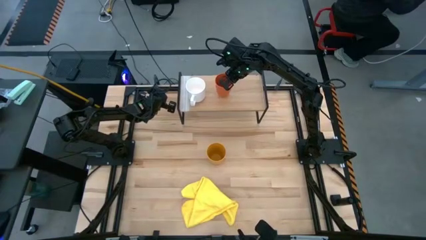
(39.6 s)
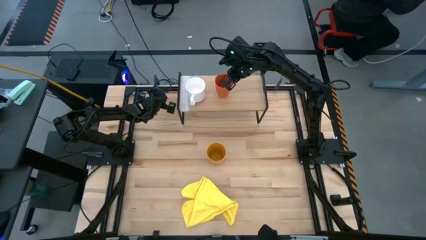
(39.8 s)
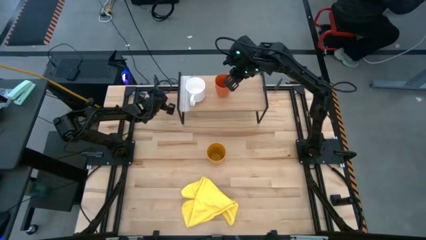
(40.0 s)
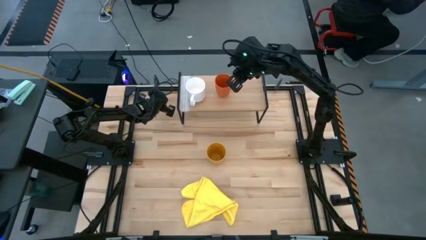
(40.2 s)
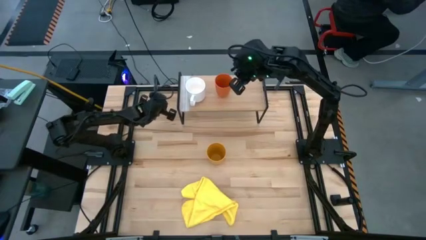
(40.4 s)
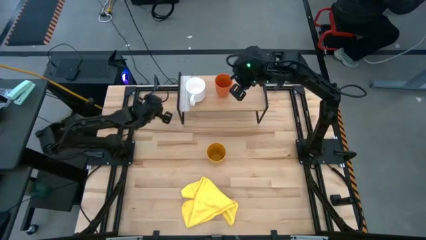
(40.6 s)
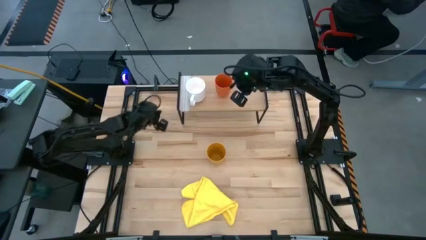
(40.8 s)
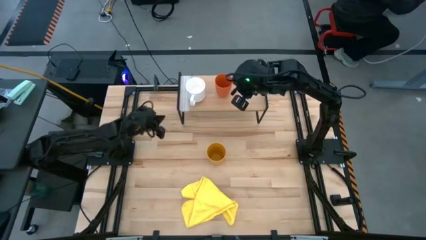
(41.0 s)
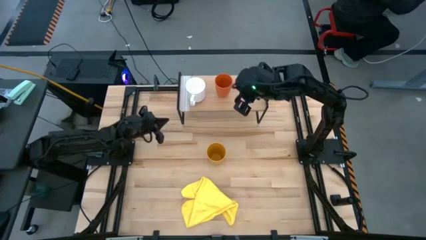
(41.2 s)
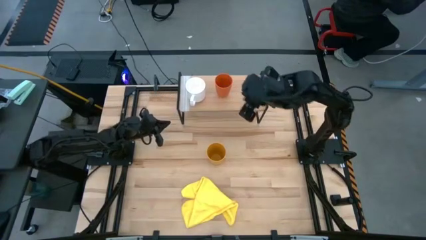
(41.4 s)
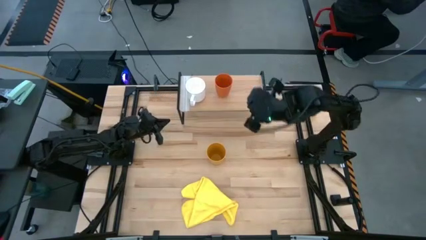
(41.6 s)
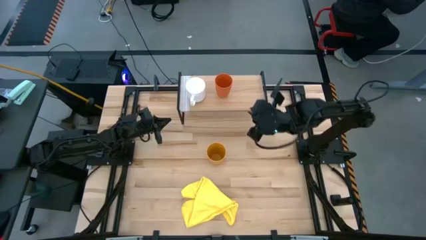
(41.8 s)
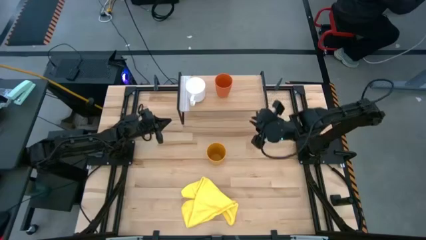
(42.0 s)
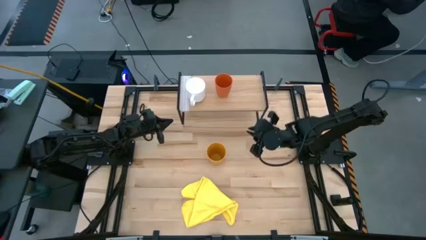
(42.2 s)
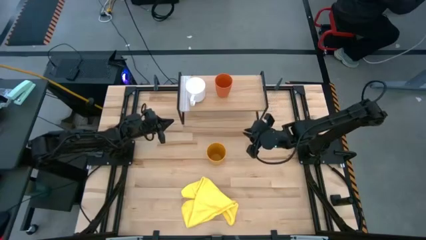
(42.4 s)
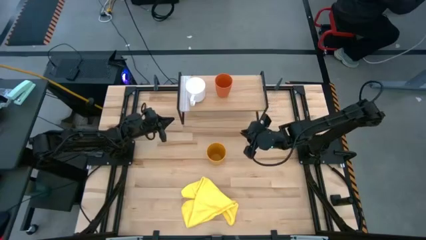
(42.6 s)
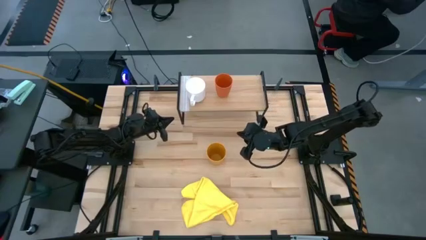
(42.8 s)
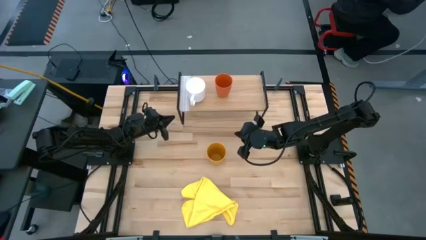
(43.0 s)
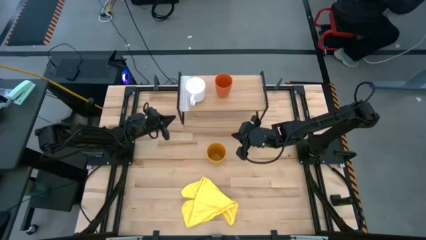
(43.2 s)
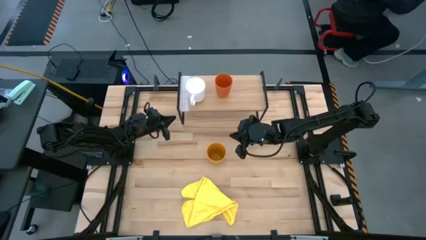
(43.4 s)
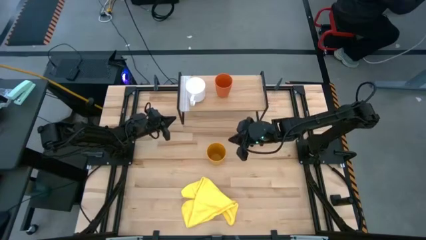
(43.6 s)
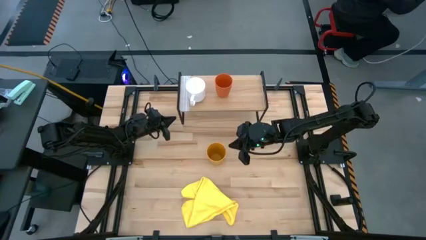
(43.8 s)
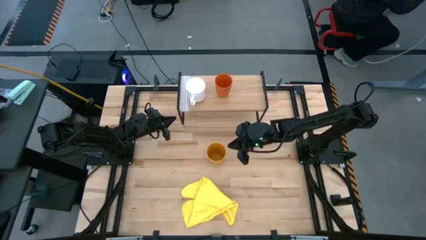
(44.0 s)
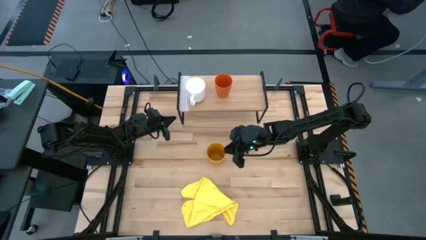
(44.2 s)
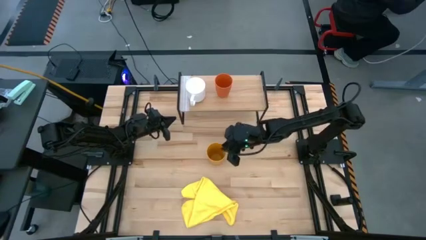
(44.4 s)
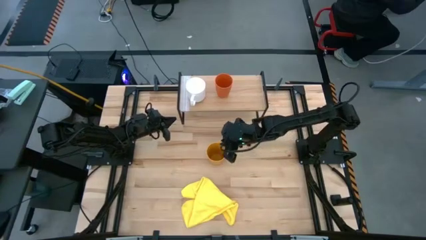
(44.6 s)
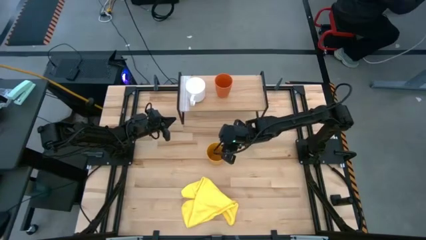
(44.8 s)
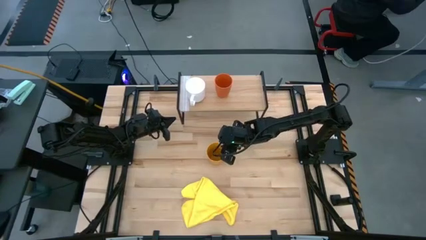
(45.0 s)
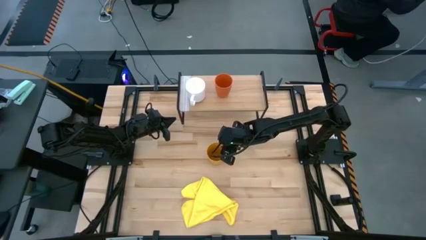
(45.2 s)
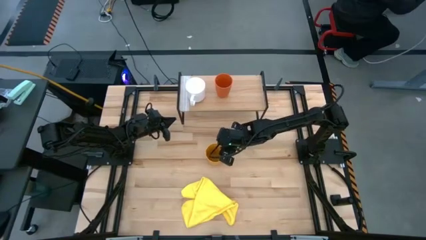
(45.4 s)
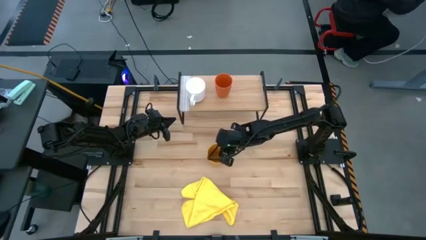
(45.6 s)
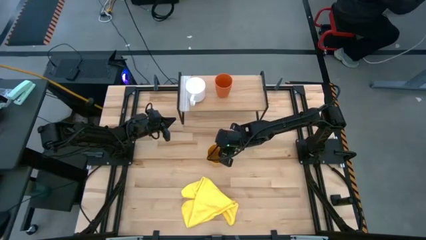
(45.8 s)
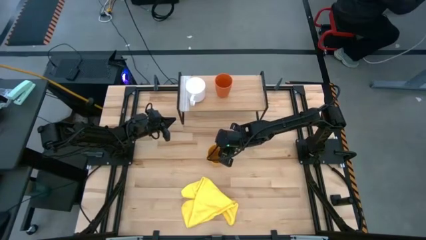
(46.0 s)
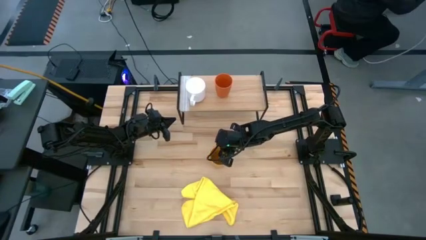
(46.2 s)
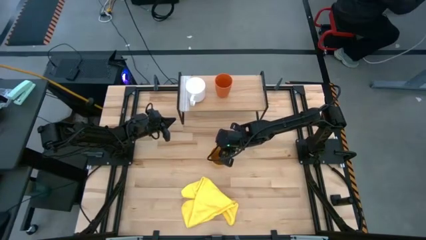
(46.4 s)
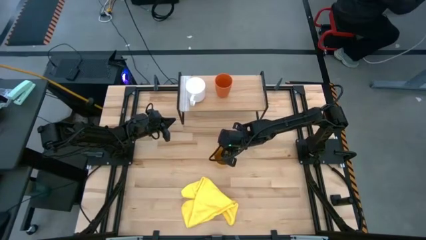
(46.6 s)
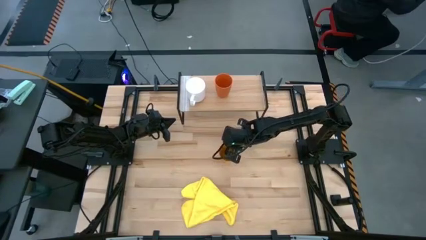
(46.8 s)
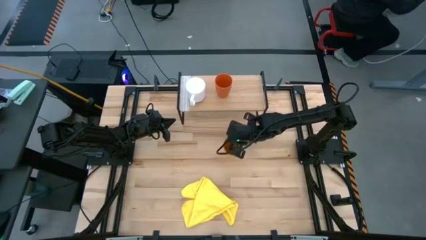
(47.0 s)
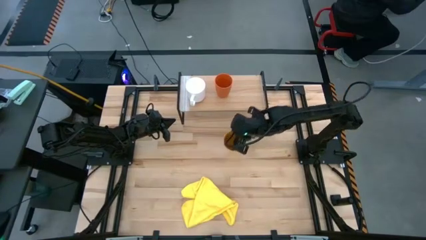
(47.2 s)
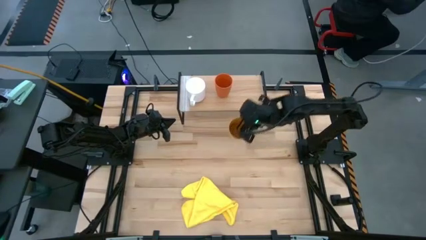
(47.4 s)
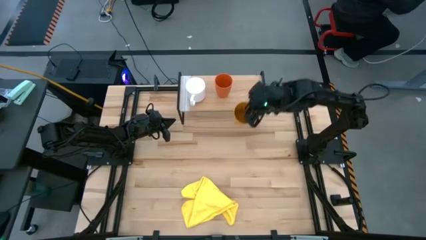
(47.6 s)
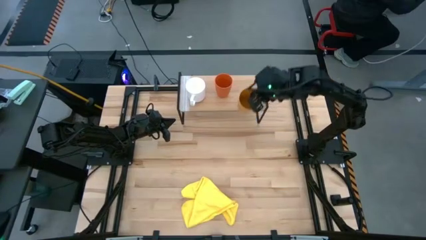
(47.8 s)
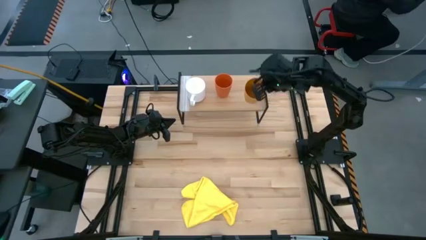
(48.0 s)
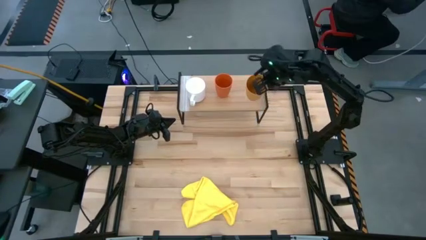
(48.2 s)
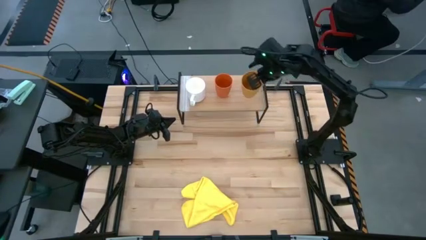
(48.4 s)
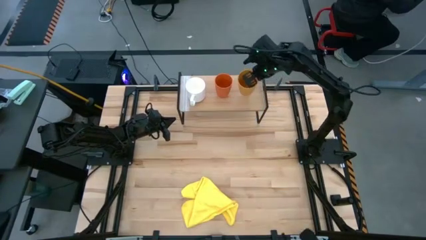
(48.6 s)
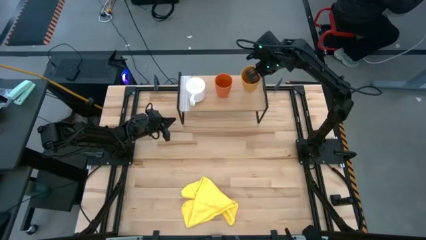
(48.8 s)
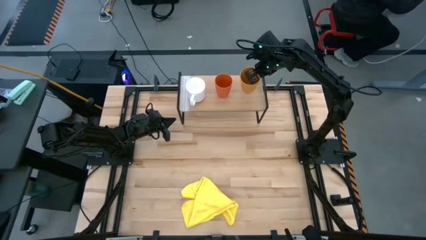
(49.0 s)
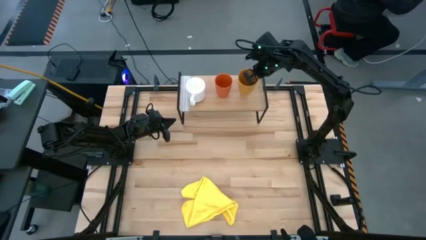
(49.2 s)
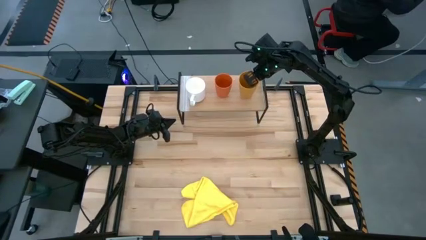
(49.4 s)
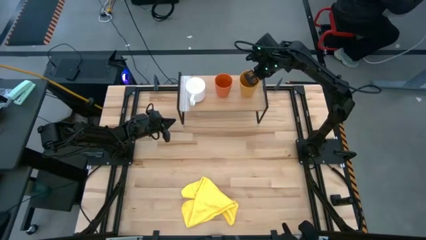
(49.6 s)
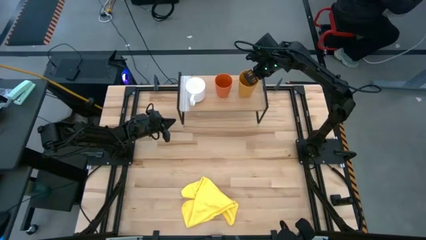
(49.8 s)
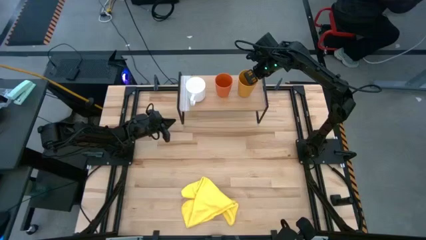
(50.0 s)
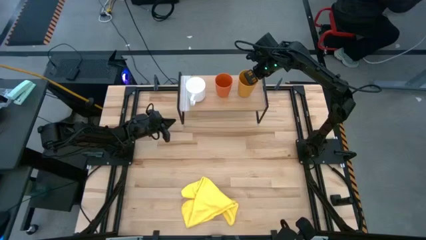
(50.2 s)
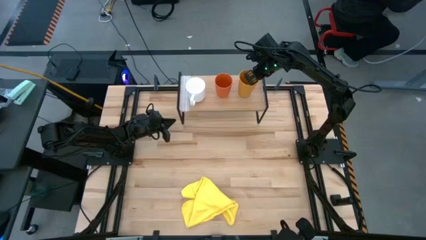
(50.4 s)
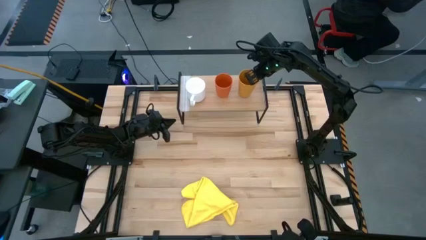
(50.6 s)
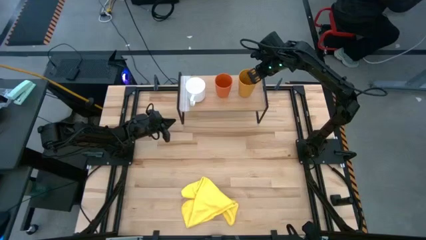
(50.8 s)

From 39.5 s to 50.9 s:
Task: Stack small to large cups/mugs on shelf
Put the yellow cup on the shelf

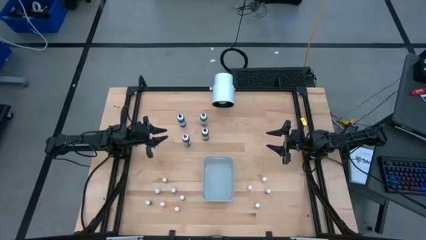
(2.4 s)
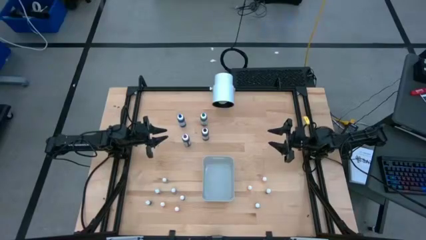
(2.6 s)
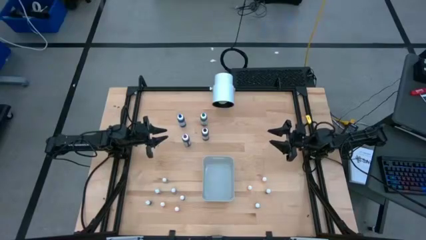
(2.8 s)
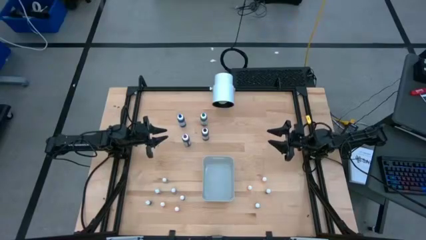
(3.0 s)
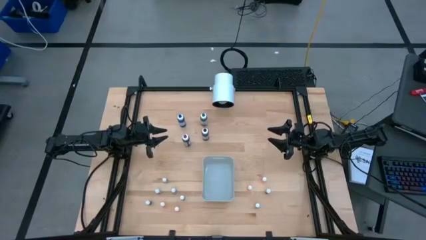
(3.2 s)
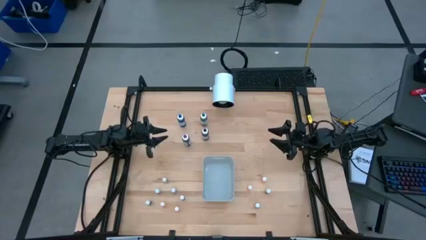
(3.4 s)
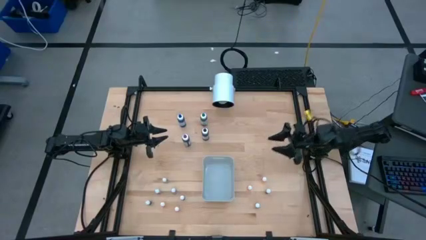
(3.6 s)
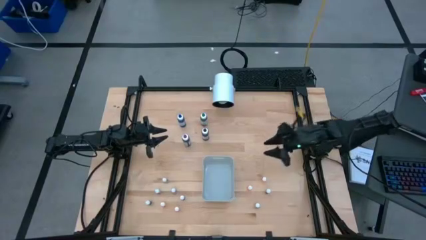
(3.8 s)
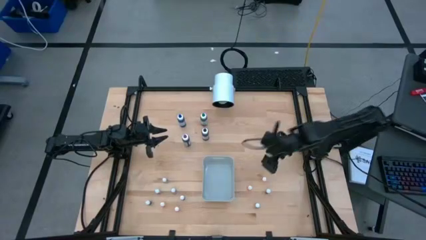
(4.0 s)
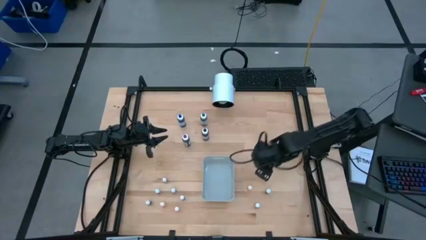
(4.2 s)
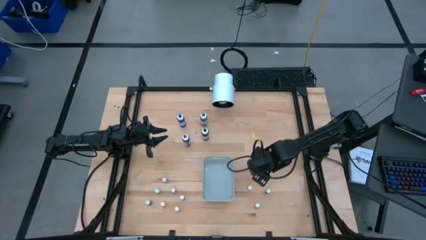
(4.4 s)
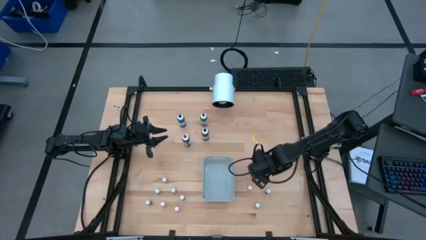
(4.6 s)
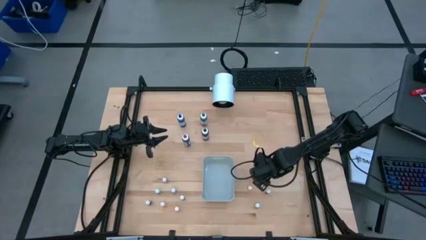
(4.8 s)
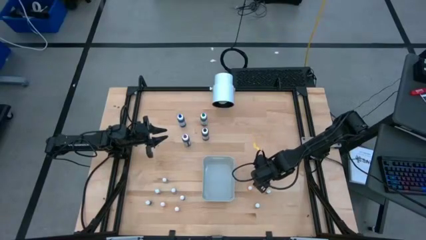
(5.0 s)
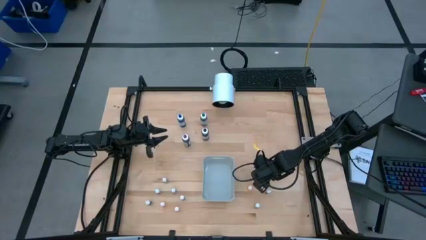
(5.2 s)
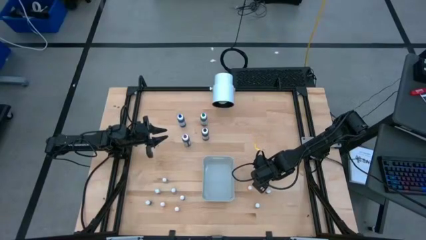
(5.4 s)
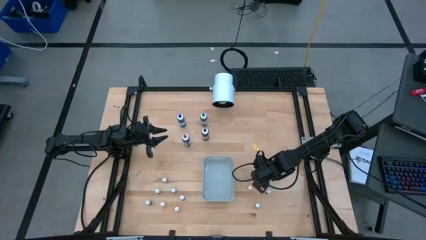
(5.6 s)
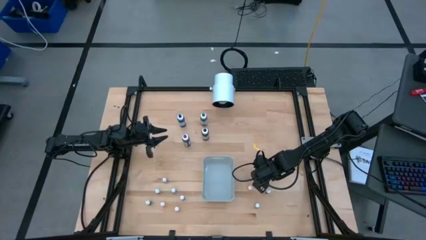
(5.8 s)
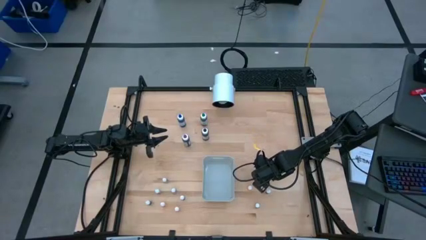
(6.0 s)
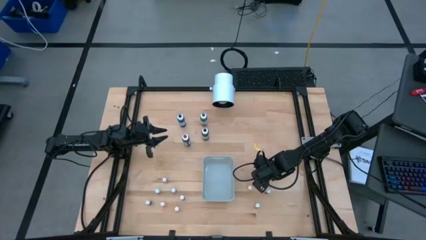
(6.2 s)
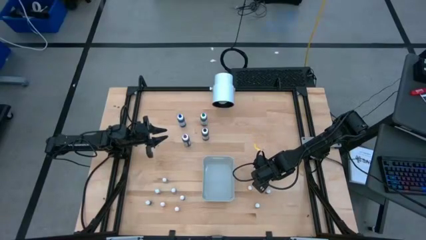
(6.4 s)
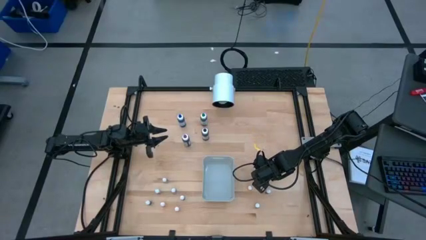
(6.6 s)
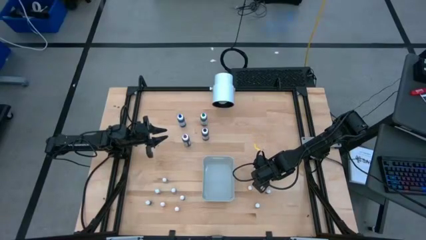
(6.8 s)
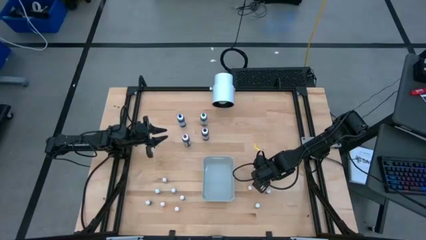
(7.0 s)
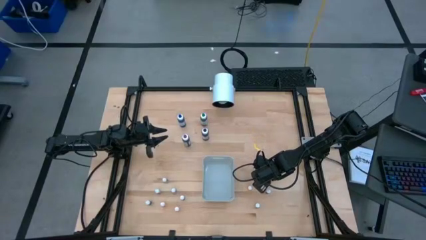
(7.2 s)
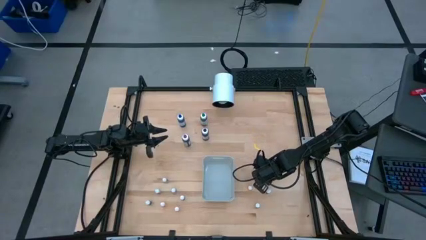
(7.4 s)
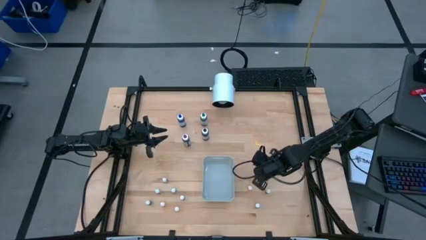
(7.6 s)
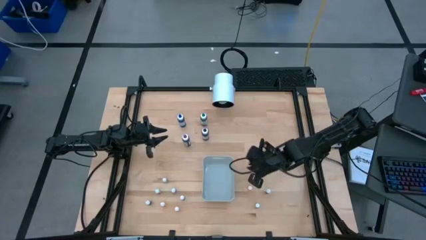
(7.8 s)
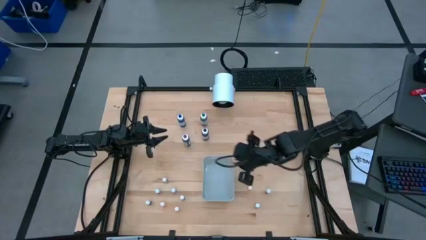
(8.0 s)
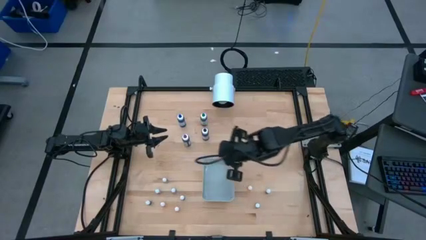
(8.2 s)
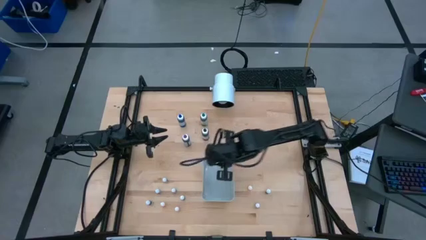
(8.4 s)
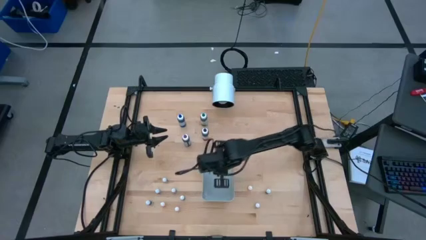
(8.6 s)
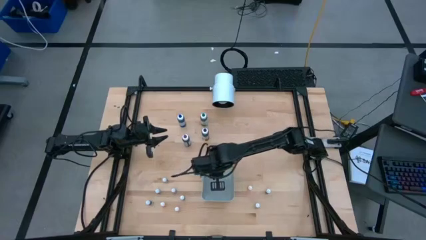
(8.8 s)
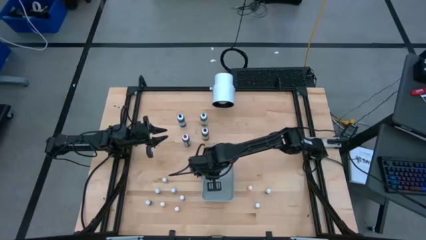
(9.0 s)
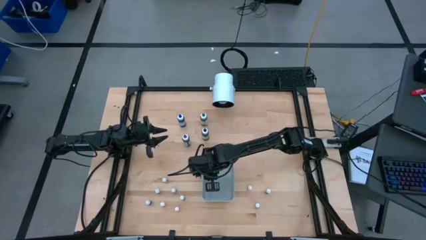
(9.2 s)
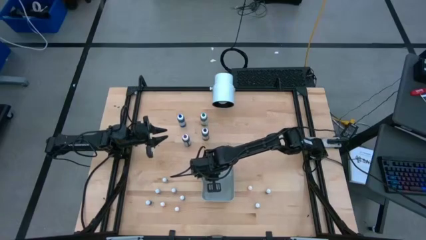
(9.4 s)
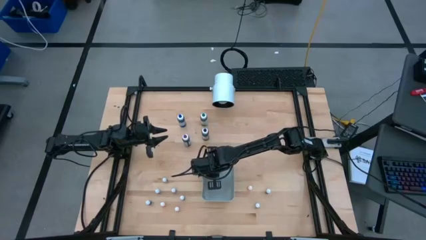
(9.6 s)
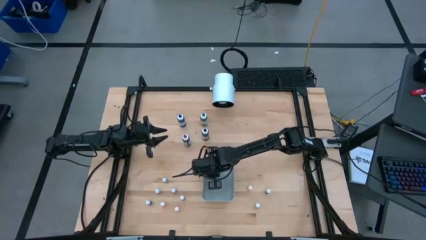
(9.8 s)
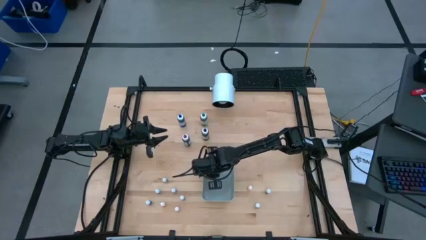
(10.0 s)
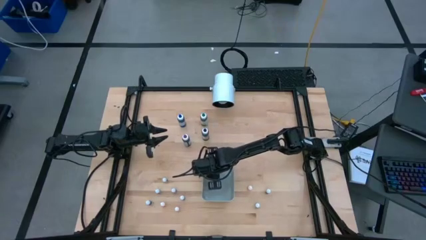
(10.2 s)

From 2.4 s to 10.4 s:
Task: Pick & Place food coloring
Put the small orange food coloring bottle into the gray bin
